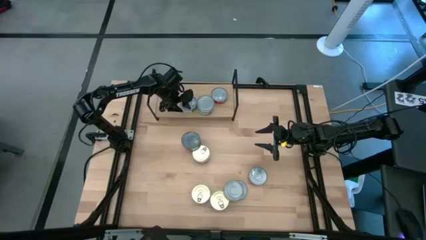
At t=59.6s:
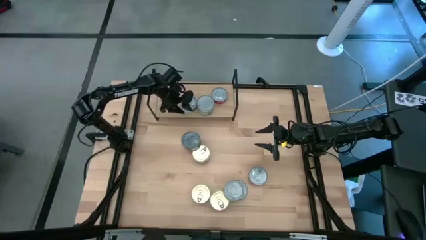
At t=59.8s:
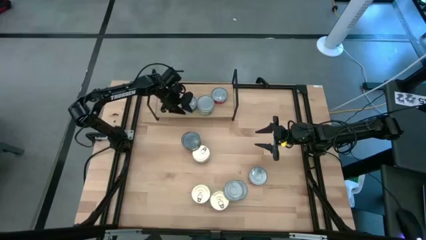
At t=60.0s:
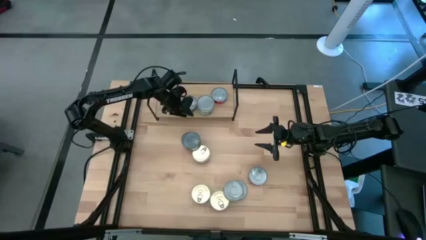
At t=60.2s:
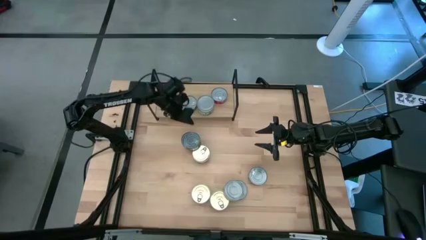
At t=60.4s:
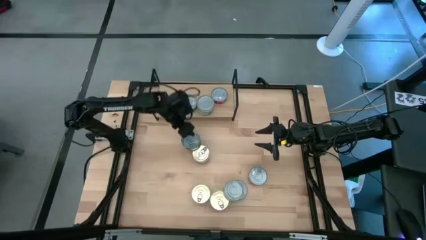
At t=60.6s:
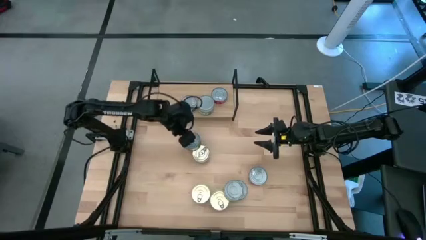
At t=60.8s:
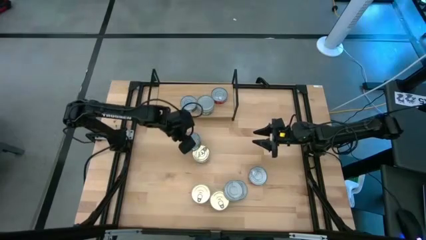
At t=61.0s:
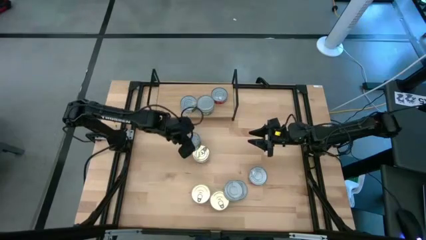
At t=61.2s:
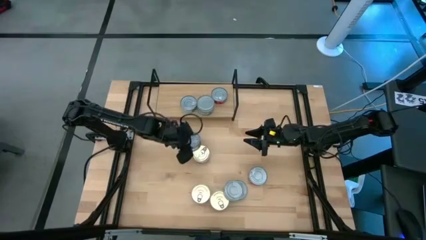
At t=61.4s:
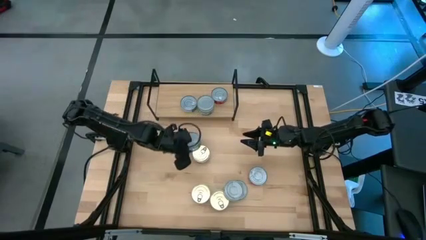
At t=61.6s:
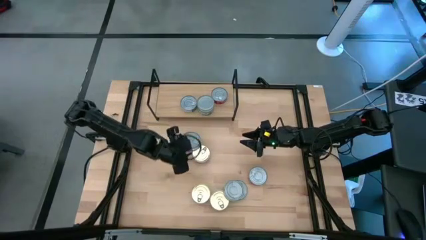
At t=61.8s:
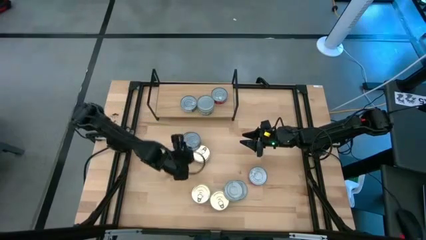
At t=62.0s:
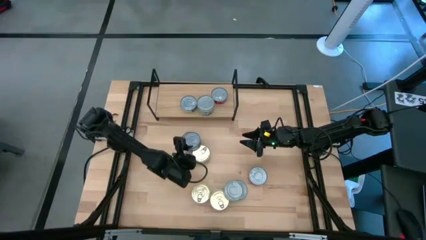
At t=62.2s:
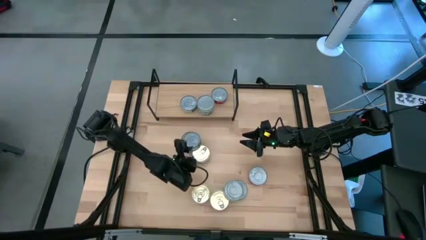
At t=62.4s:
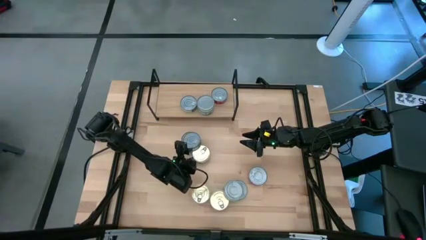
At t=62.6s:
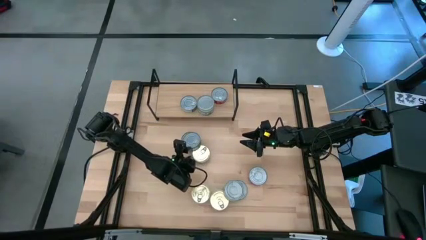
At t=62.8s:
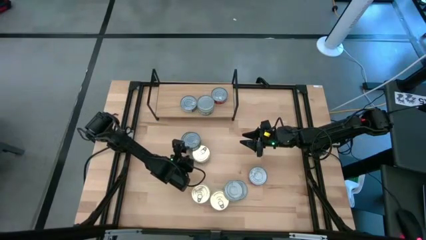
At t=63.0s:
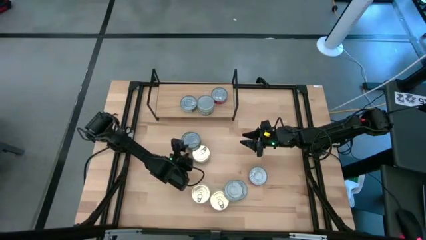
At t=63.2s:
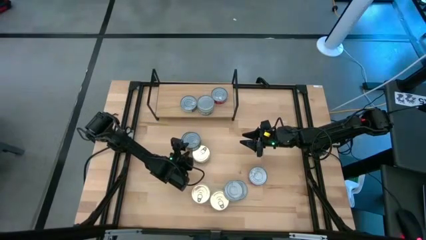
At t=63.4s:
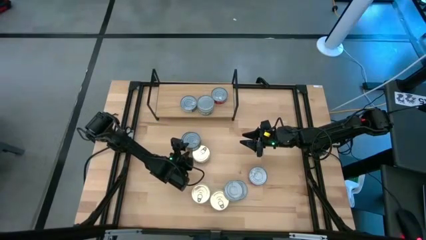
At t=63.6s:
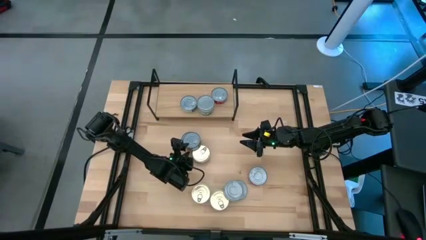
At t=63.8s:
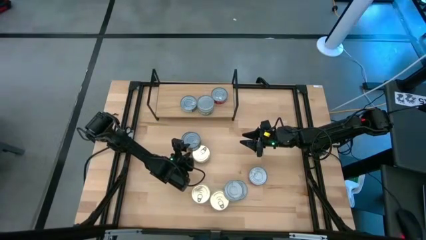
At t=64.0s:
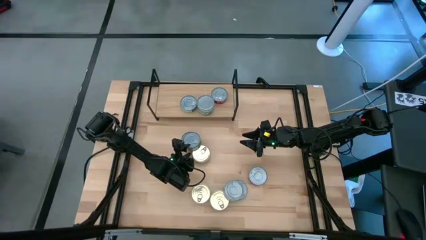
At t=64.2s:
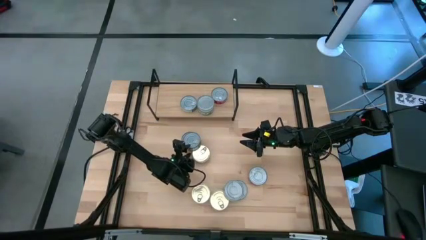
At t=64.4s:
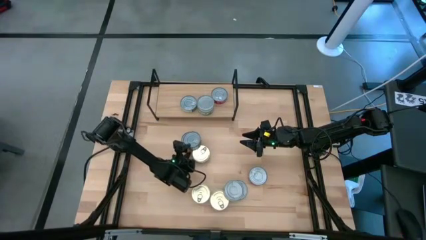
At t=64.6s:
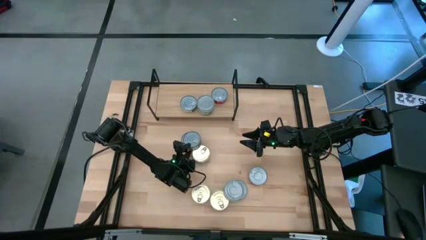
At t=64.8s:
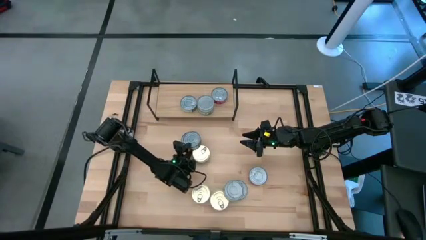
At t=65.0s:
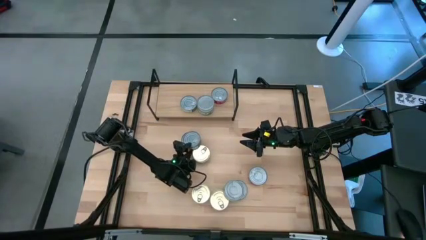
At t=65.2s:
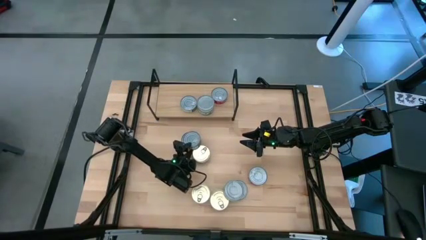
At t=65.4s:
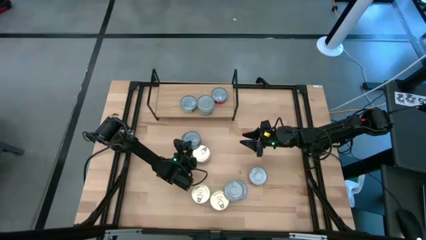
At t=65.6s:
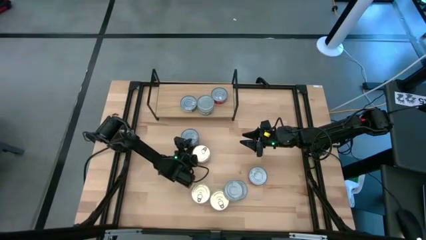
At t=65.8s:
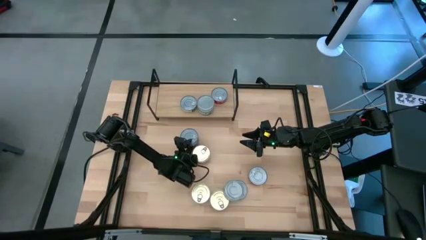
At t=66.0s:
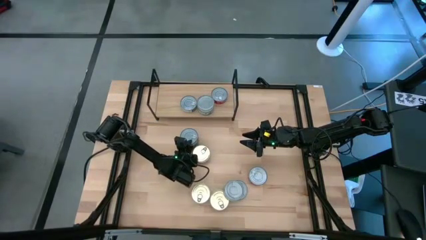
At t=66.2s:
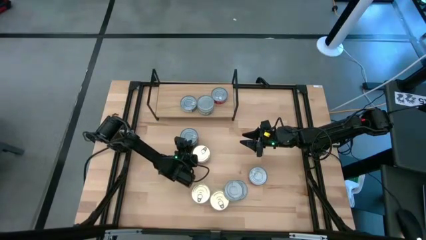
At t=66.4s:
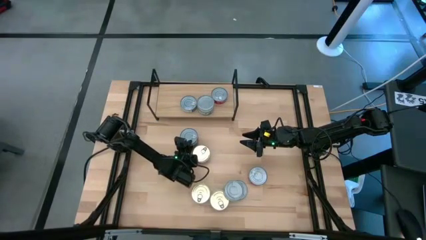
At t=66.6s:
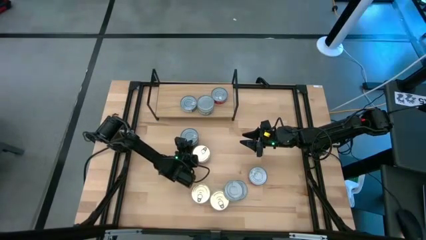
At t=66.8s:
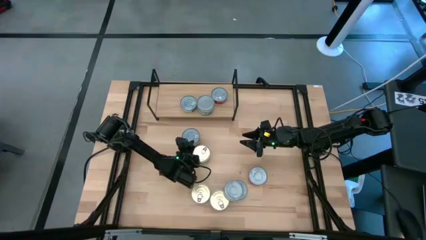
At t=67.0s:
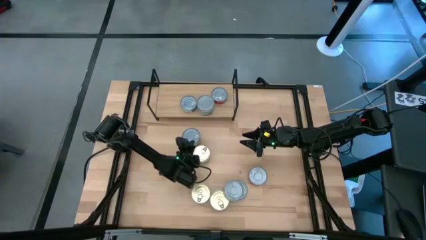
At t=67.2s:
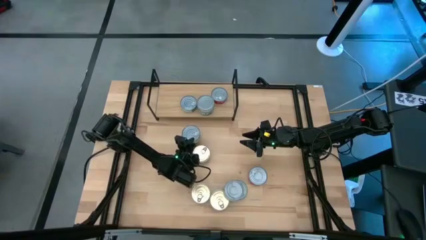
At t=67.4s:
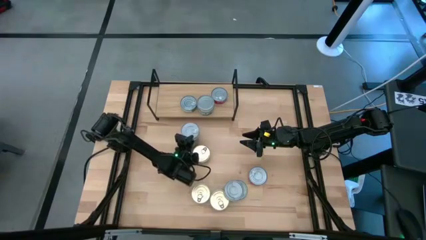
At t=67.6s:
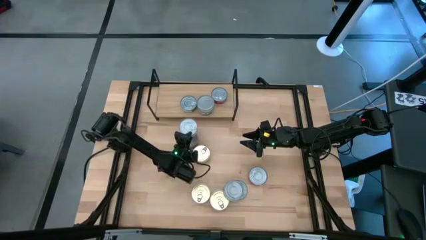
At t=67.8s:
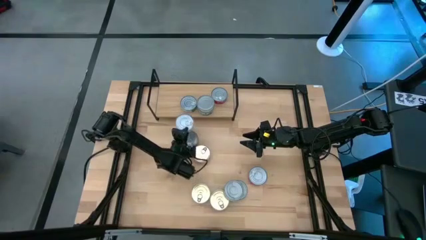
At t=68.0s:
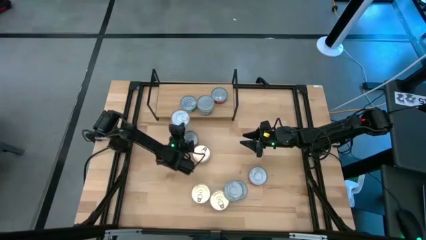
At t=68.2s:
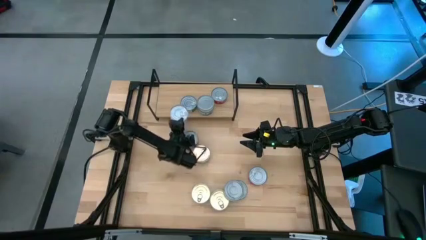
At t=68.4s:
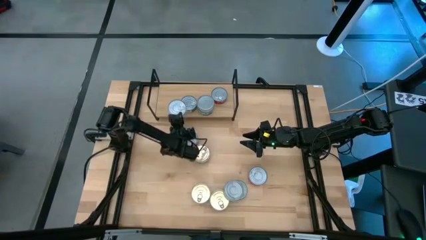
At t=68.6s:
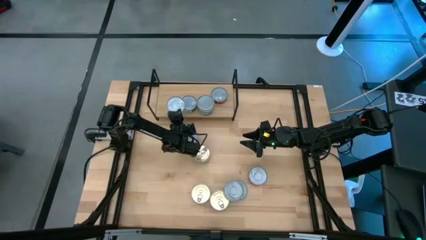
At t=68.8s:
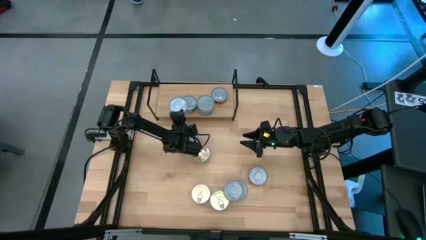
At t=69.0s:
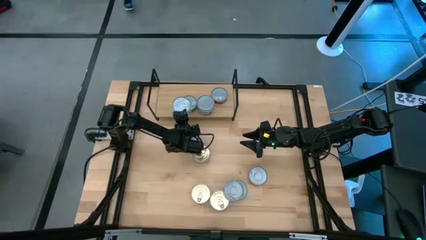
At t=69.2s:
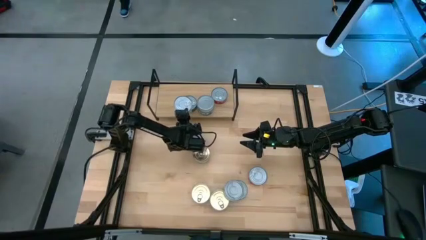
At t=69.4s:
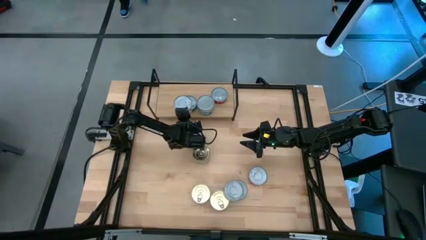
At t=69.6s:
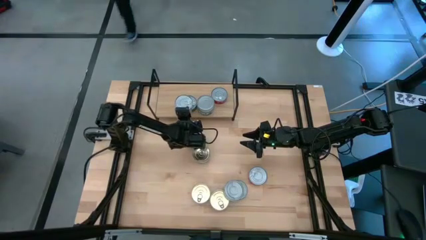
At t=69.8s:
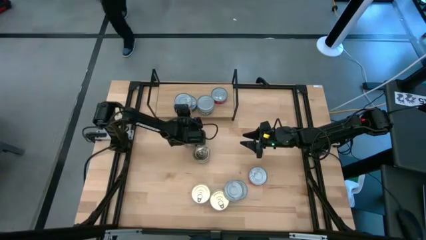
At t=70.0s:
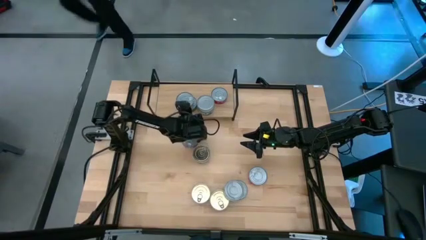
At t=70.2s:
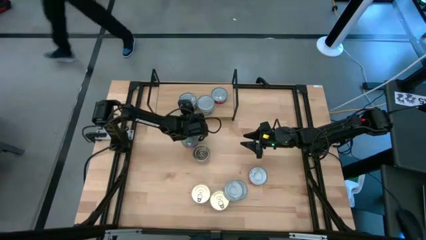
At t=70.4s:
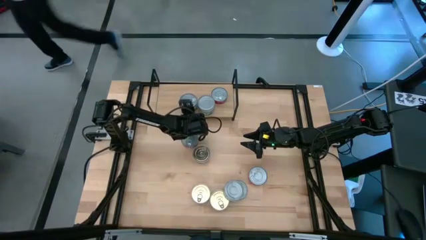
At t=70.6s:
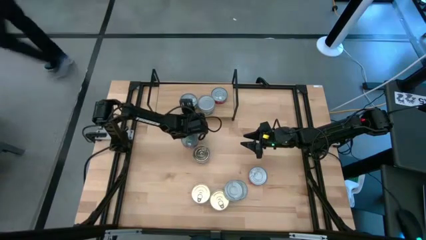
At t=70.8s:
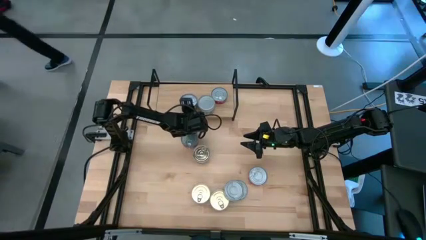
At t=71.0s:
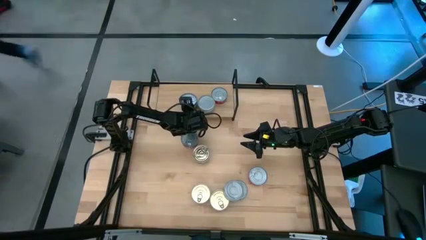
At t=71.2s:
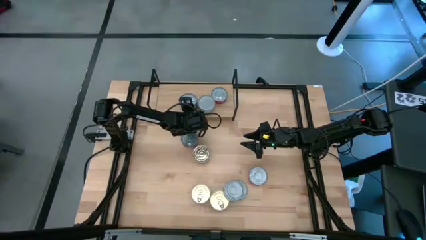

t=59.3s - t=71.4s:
Task: Stack canned seafood by type on shelf
Stack the green tuna can on top of the other green tuna can on the shelf
